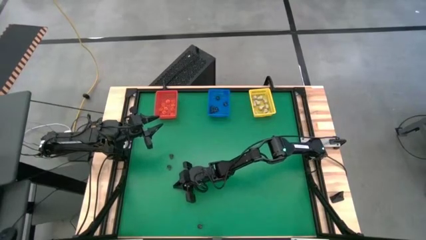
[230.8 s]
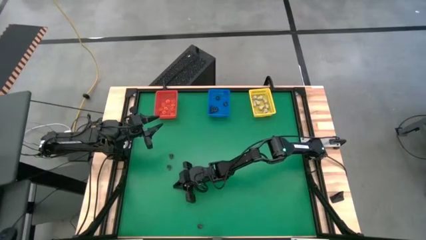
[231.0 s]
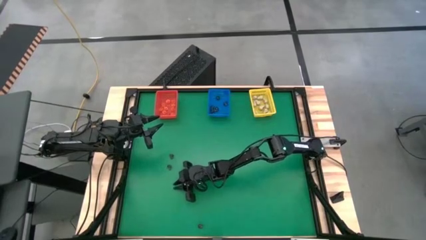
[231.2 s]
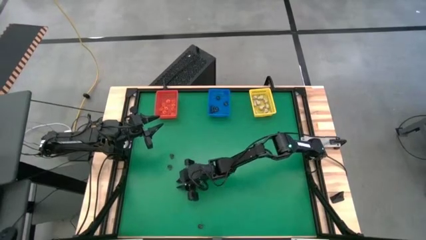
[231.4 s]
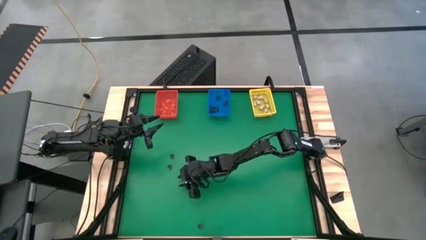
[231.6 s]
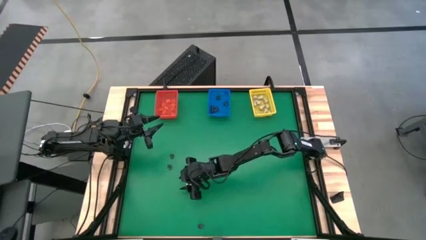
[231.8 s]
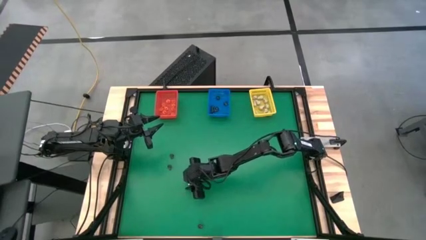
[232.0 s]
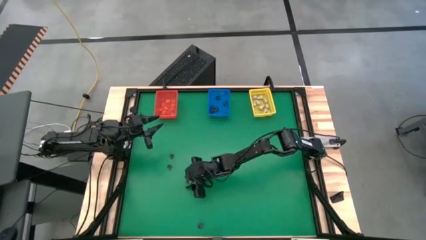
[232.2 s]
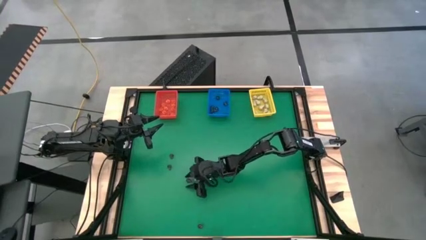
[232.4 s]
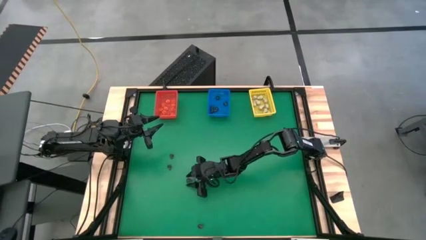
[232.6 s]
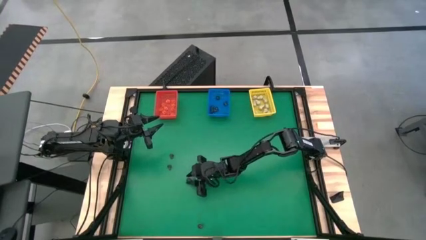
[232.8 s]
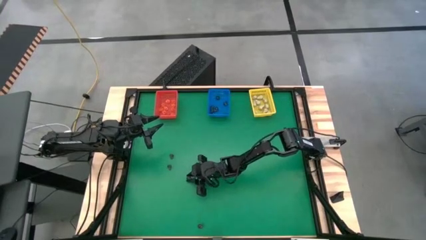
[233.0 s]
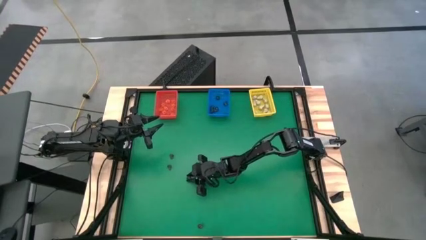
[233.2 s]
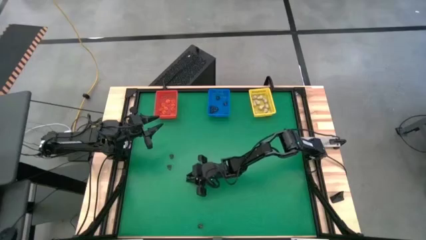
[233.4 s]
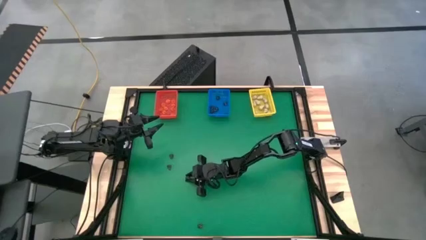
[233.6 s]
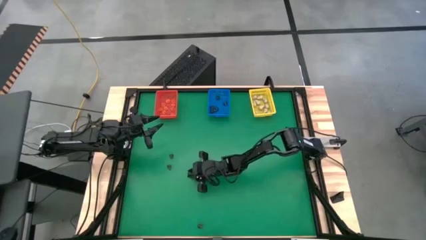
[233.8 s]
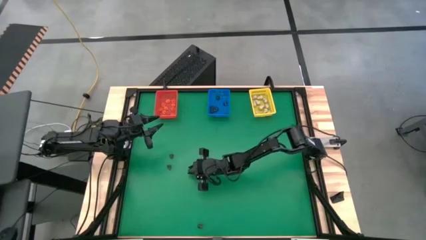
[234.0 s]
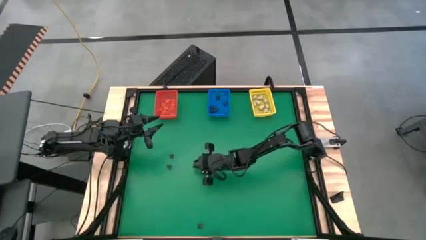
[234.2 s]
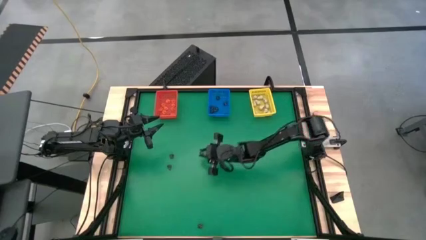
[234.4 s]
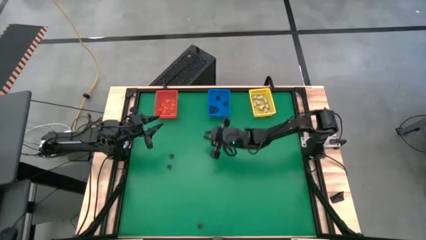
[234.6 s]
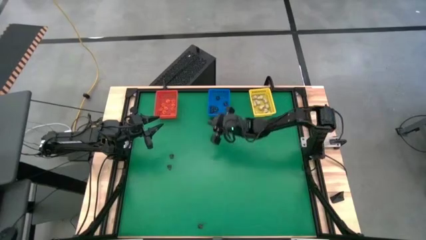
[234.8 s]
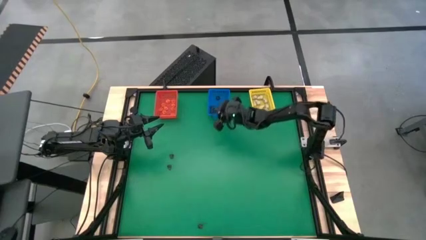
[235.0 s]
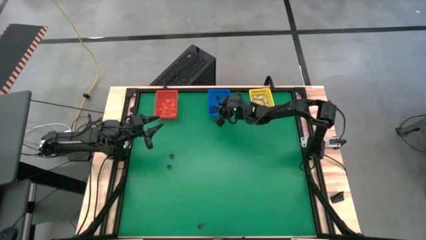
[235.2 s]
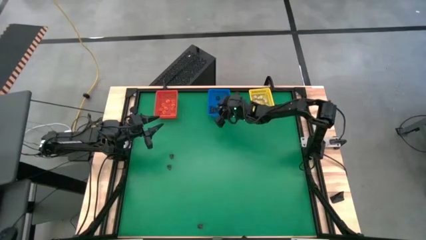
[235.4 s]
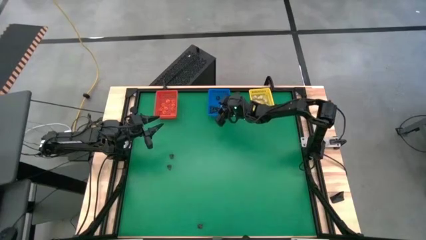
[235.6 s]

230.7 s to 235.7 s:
Task: Sort Halloween decoration
Put the black skull toy into the blue bin

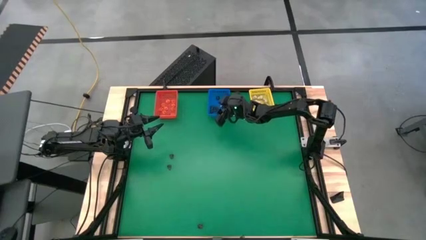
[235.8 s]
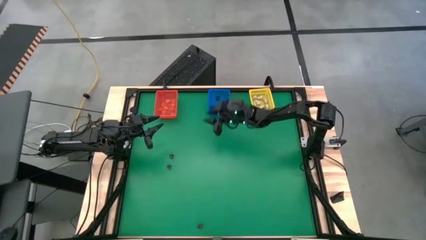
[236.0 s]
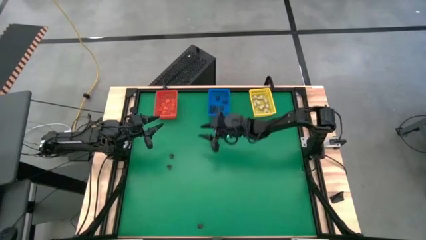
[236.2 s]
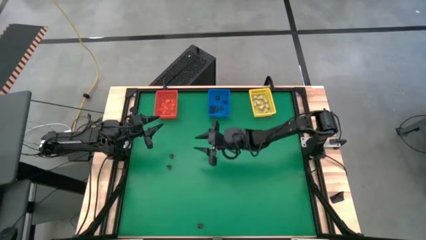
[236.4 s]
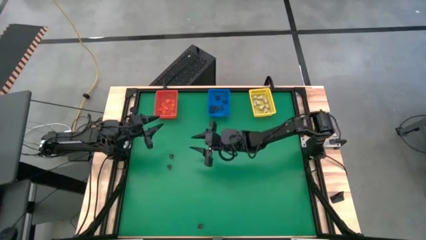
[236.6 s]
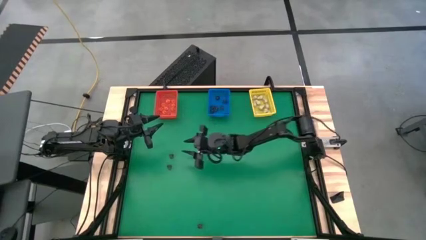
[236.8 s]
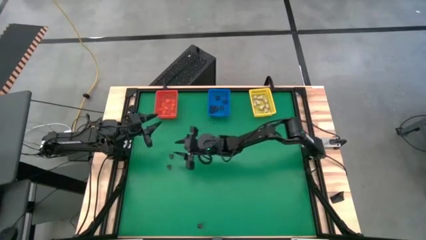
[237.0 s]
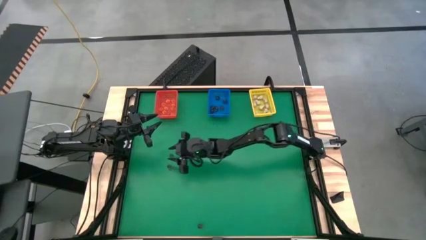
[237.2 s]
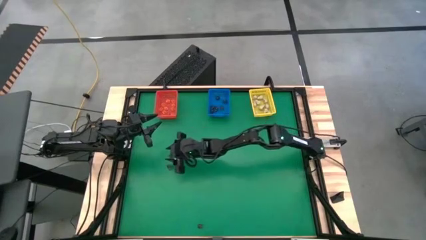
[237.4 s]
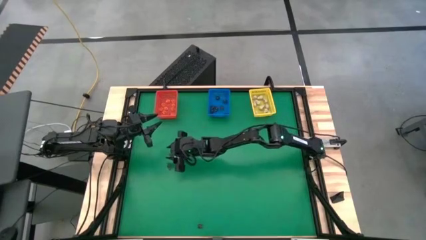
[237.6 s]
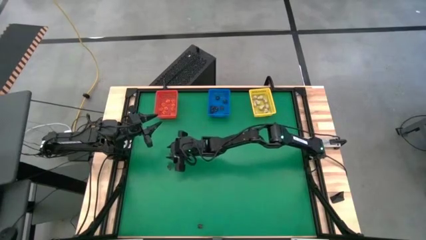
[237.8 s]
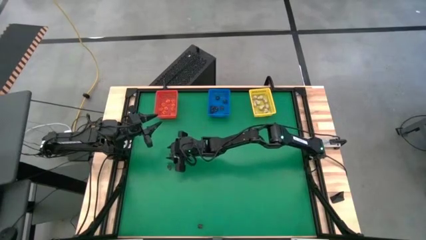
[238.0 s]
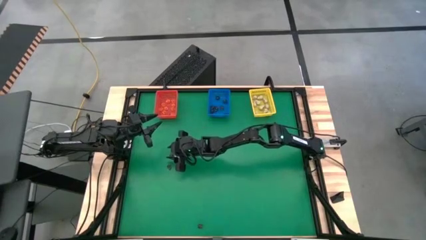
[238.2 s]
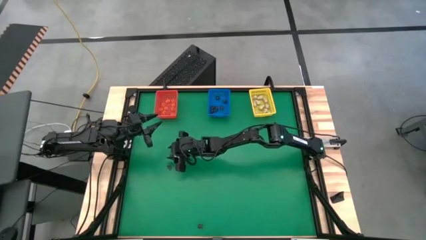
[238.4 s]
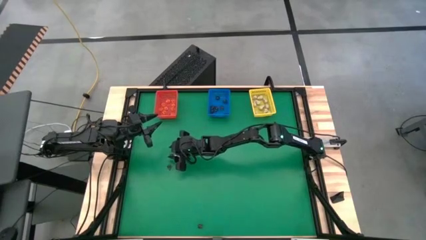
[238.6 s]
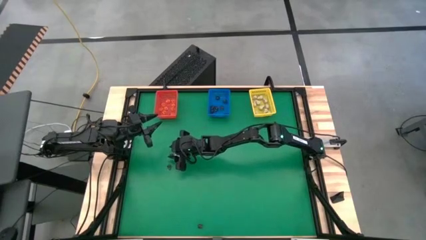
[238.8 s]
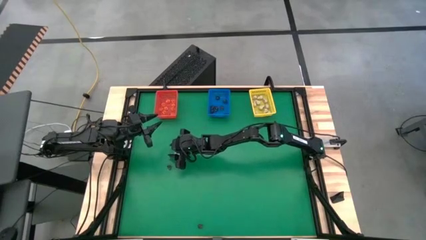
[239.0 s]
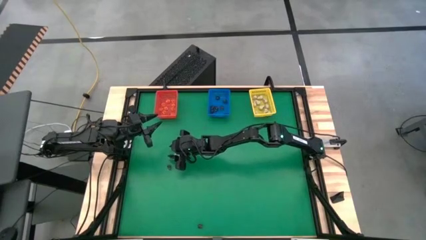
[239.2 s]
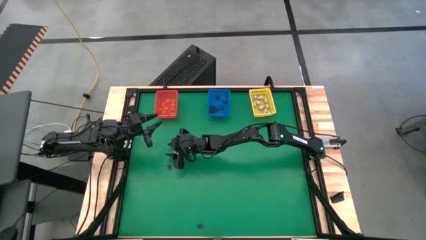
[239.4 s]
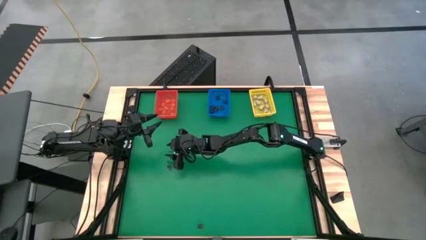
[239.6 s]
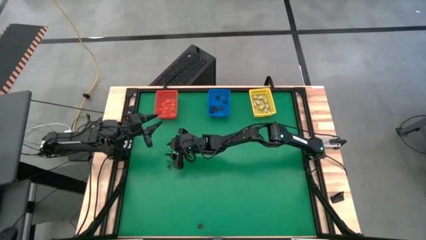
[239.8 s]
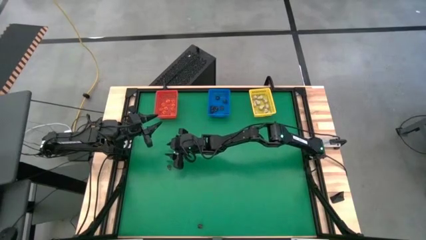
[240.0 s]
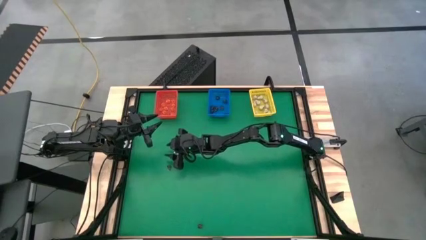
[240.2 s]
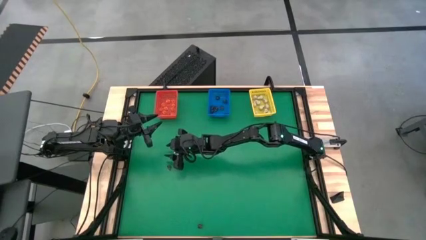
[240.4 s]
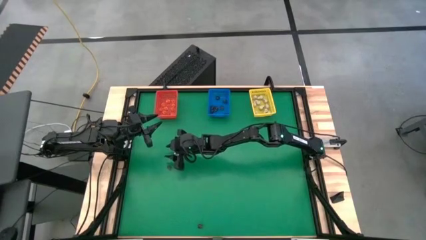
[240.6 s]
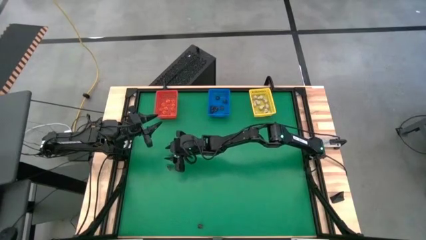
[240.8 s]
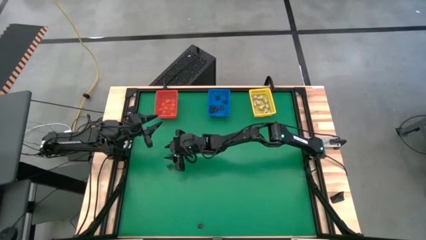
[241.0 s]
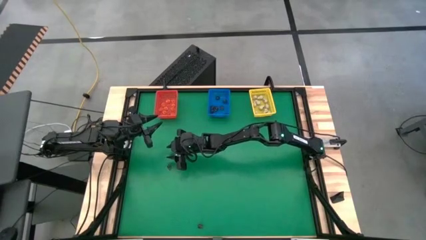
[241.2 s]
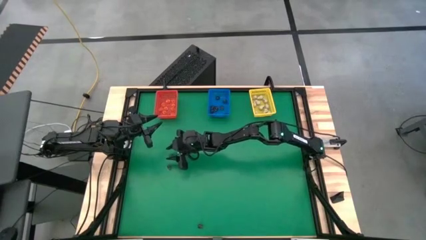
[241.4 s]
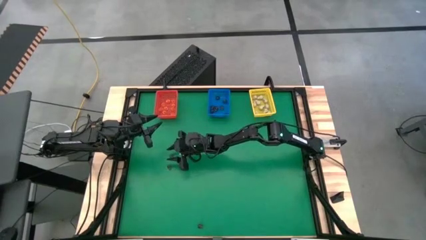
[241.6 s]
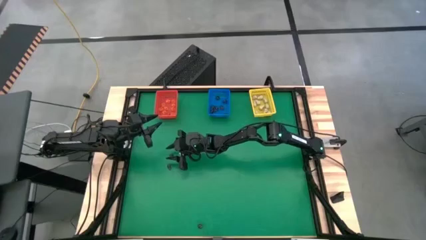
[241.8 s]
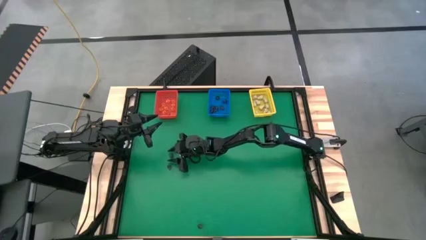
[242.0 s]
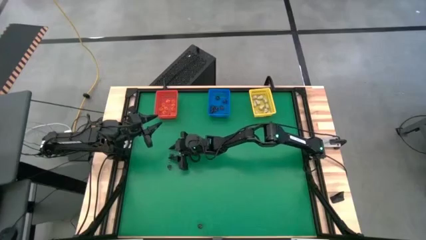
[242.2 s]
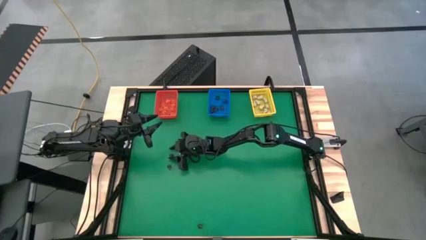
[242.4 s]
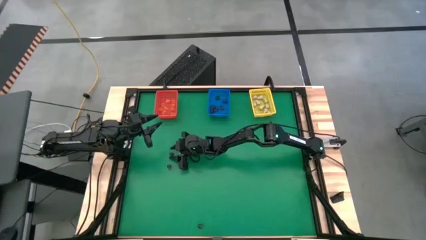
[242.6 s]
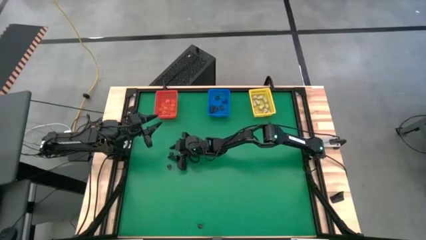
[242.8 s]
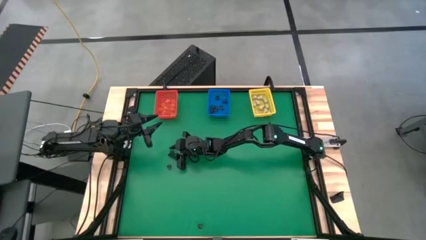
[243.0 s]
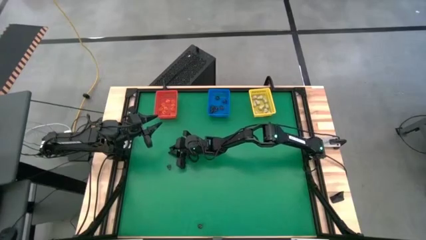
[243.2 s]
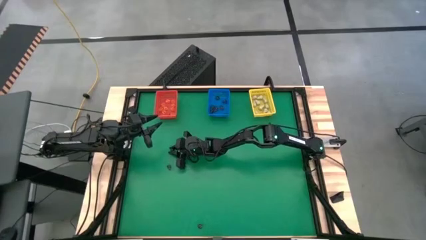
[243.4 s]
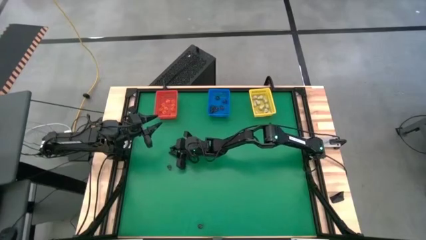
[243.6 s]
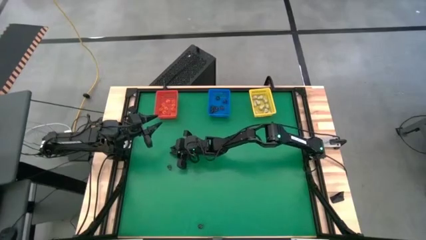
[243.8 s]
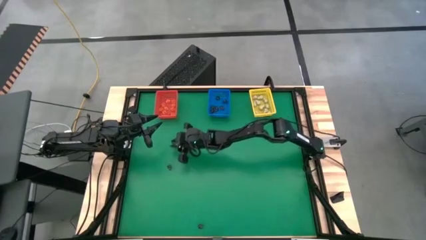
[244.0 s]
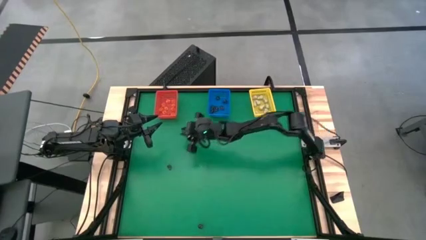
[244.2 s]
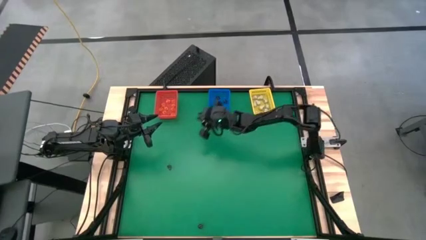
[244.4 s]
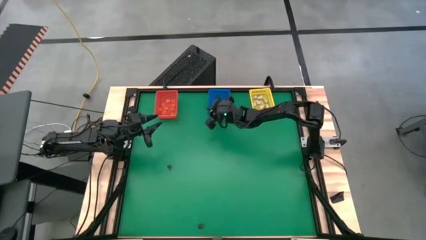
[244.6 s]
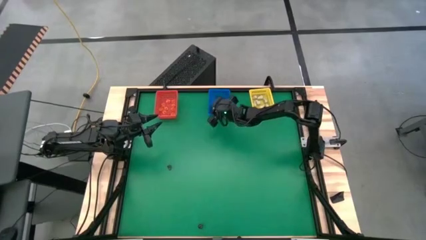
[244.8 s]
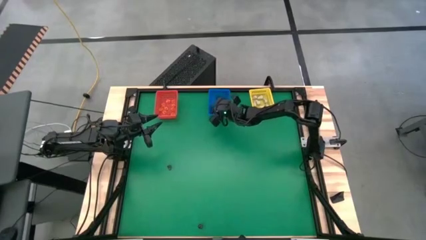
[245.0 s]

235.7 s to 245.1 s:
Put the black skull toy into the blue bin
